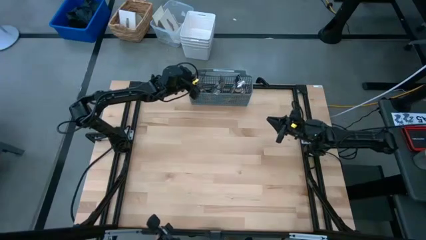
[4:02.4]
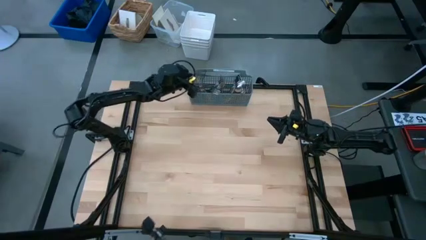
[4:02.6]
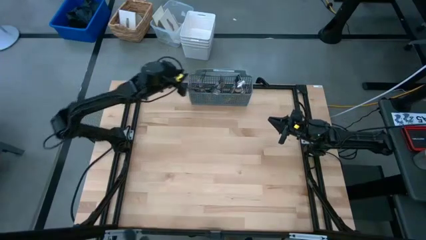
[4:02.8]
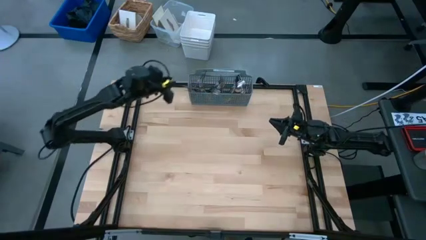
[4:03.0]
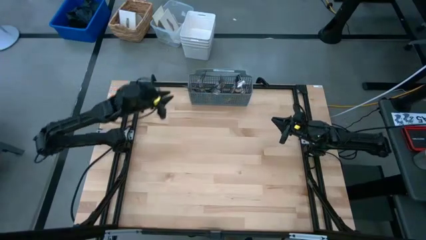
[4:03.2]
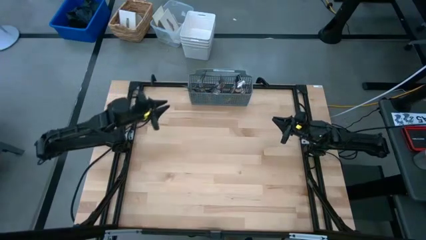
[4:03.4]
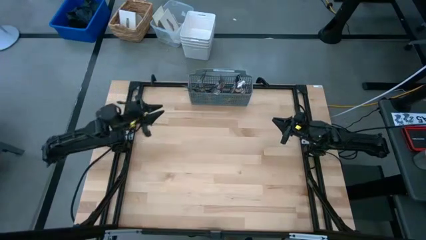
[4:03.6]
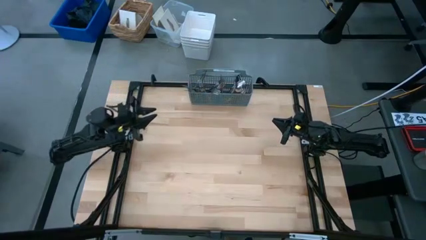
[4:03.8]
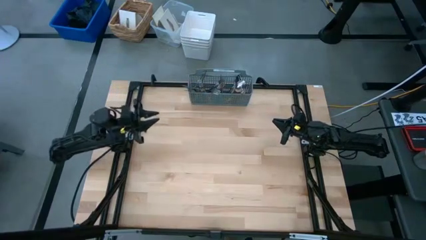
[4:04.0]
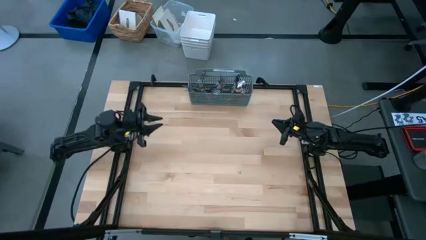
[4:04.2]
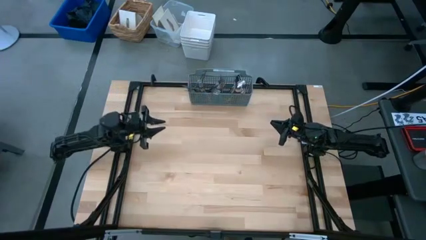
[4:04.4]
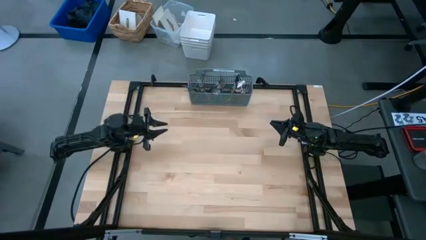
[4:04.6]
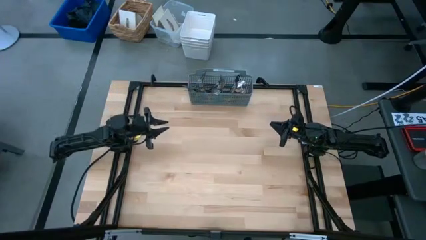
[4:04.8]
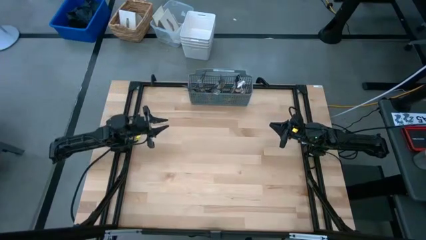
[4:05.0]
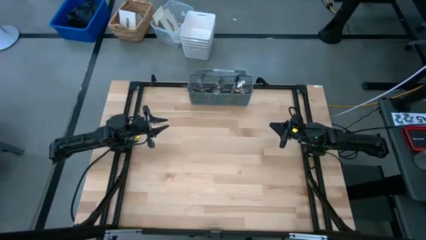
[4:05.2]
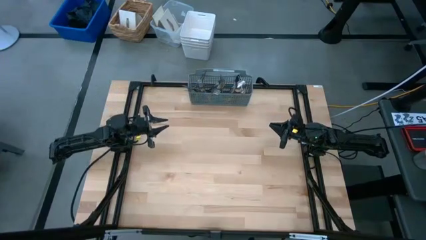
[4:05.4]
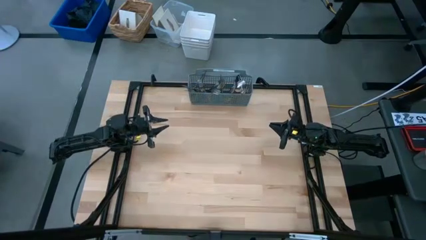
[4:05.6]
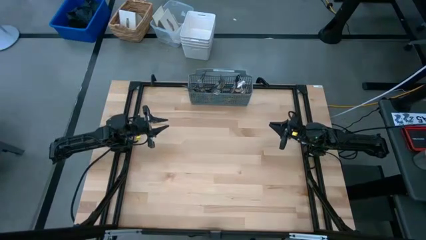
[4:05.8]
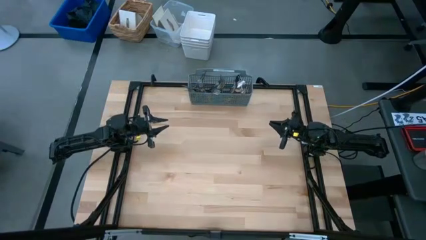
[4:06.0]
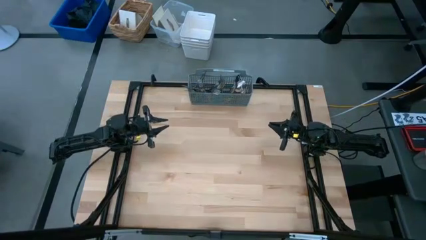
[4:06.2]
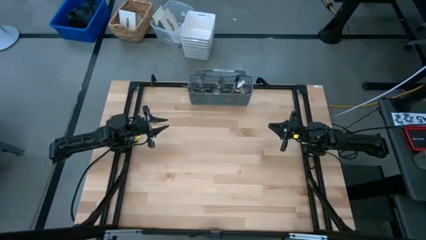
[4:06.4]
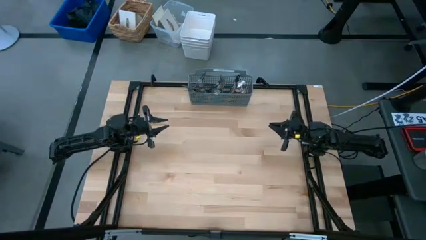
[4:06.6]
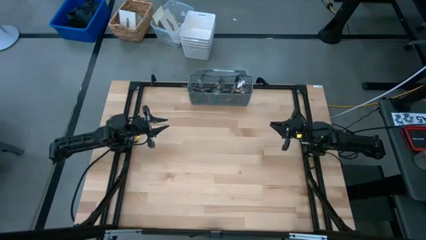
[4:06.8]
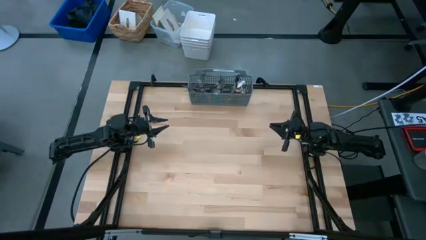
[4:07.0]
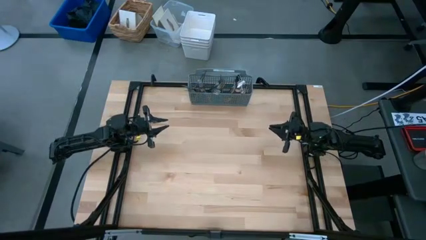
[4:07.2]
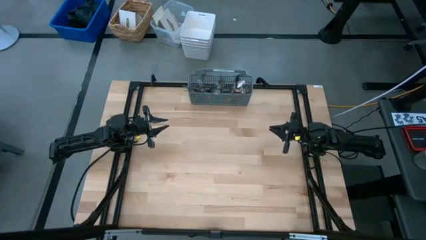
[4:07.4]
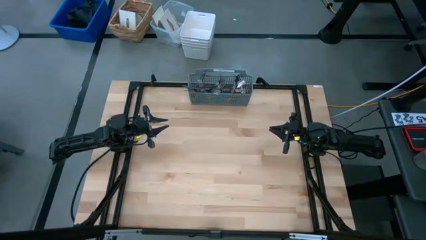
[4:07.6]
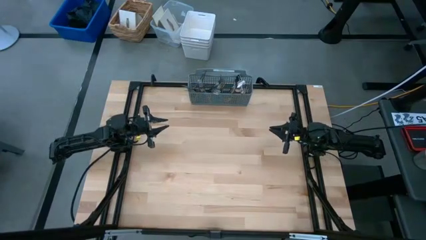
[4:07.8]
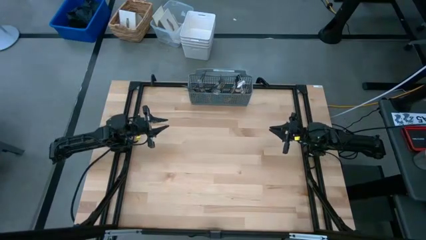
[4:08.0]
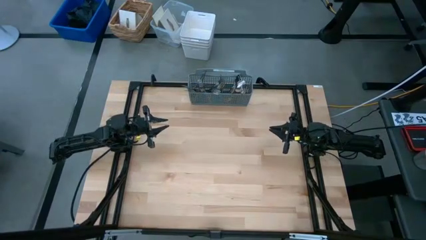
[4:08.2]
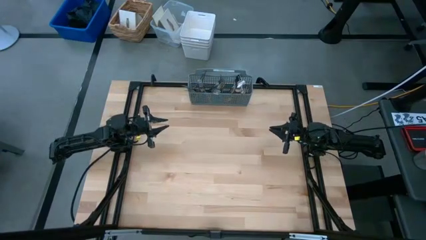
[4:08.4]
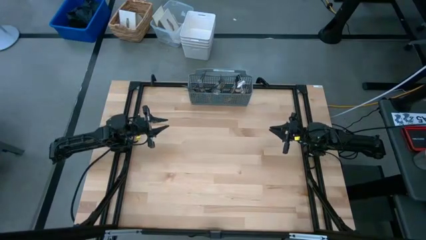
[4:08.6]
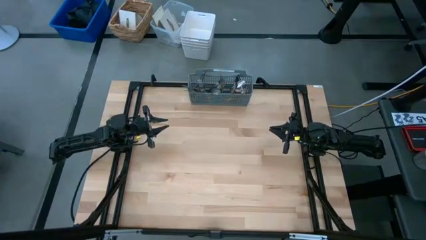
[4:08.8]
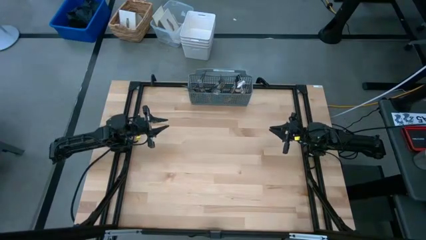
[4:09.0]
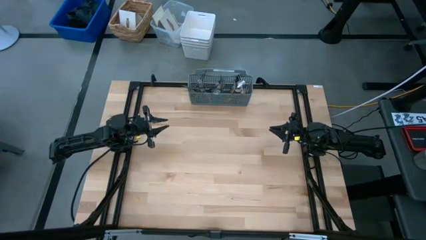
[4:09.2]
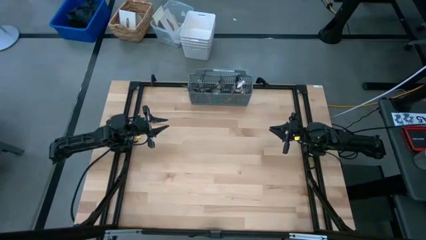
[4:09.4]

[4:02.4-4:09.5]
Task: Sort silverware
Return to Home Position

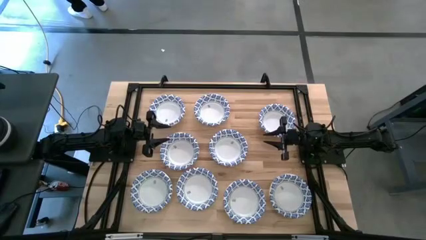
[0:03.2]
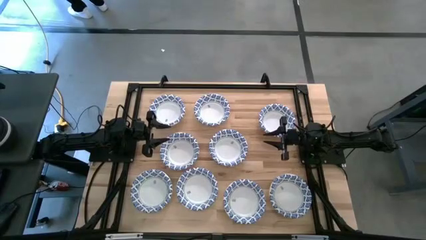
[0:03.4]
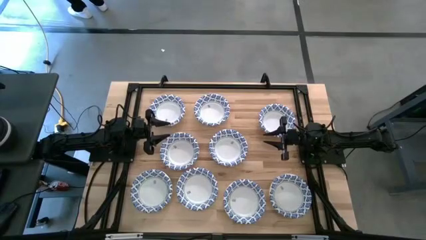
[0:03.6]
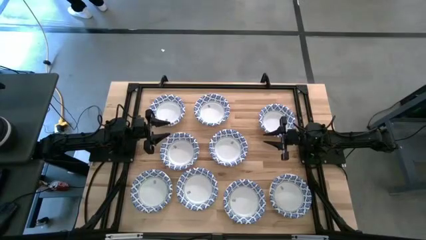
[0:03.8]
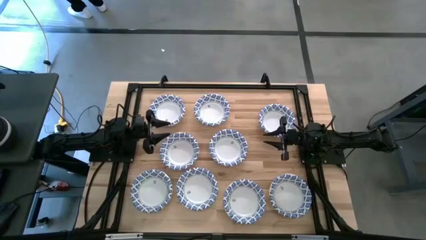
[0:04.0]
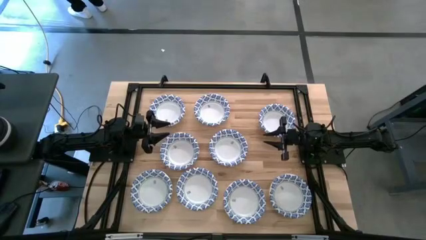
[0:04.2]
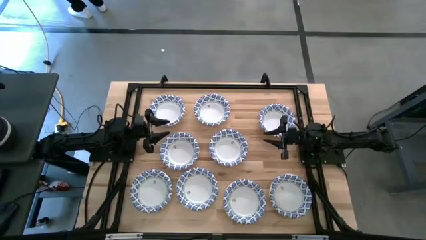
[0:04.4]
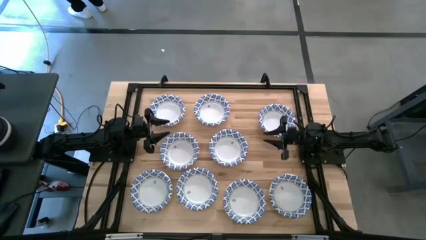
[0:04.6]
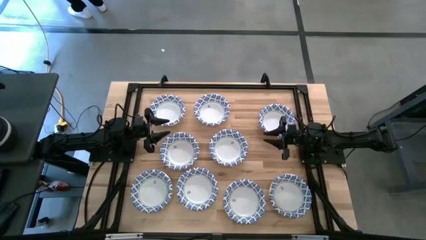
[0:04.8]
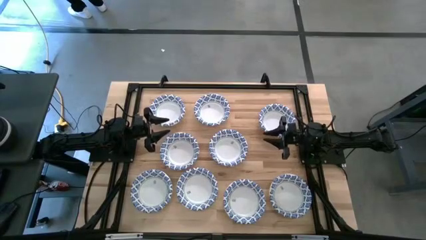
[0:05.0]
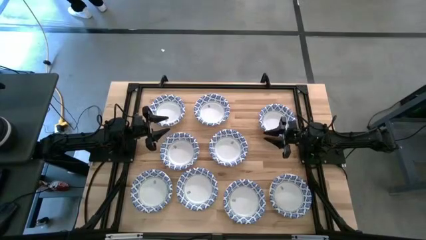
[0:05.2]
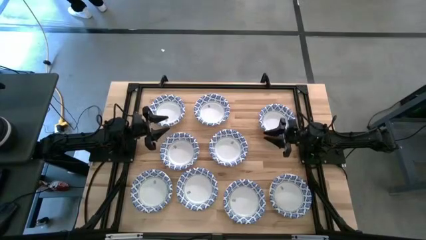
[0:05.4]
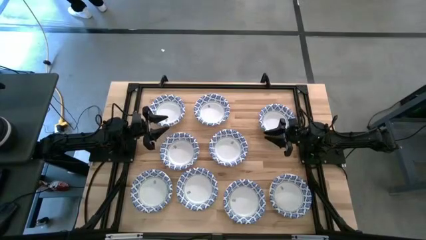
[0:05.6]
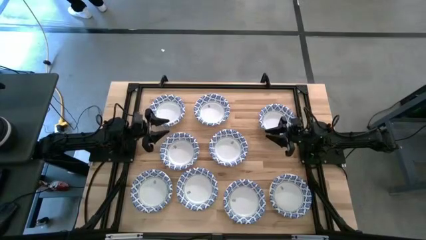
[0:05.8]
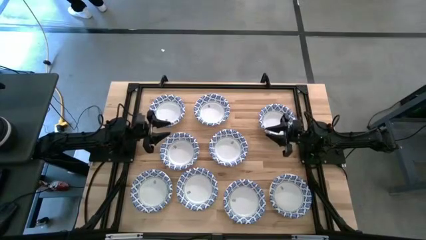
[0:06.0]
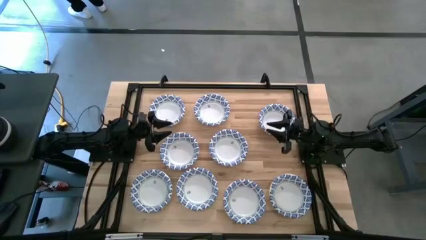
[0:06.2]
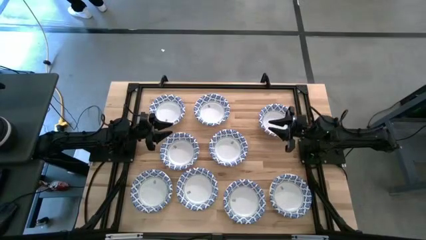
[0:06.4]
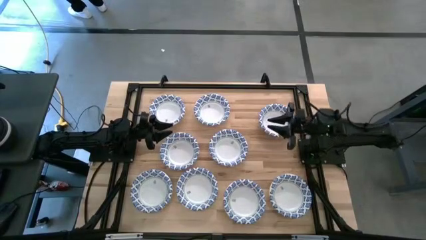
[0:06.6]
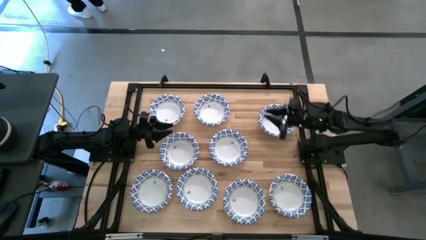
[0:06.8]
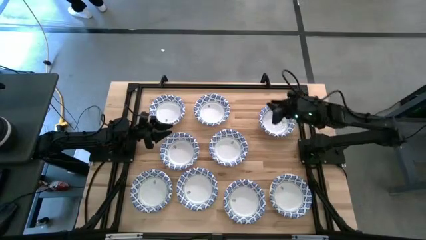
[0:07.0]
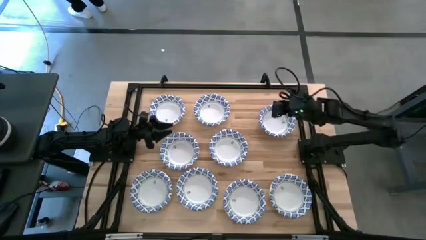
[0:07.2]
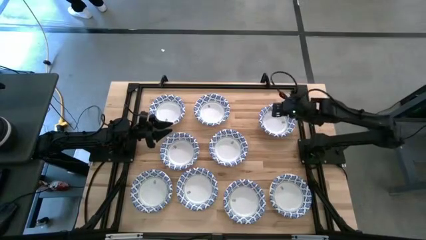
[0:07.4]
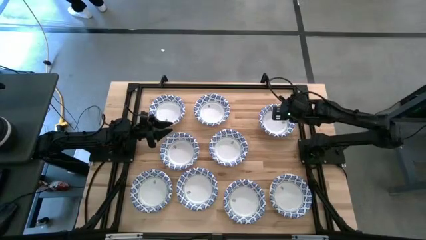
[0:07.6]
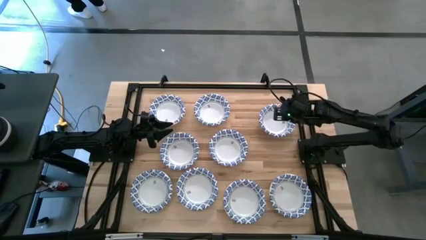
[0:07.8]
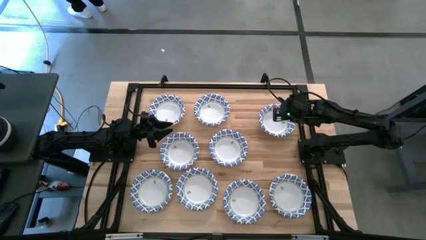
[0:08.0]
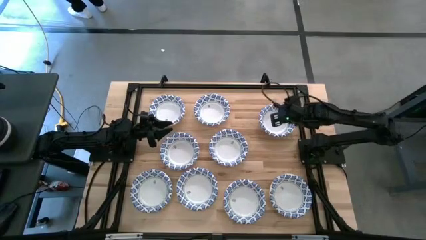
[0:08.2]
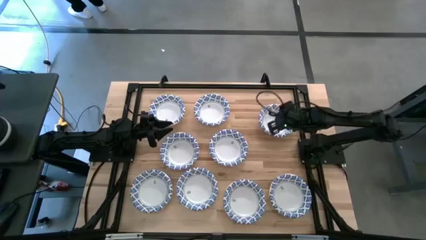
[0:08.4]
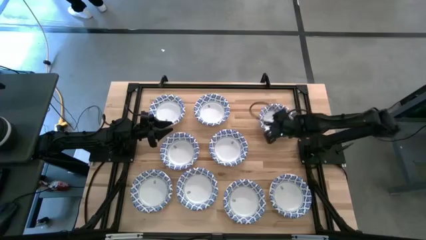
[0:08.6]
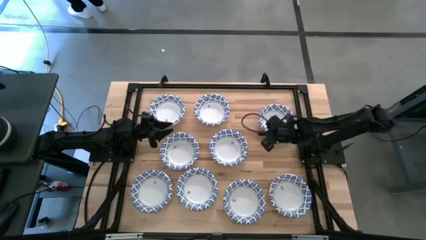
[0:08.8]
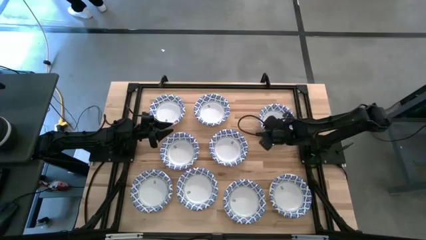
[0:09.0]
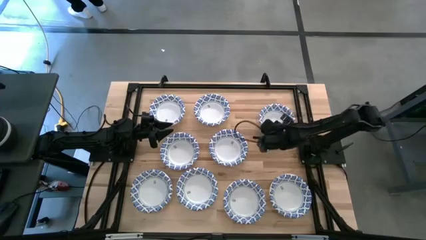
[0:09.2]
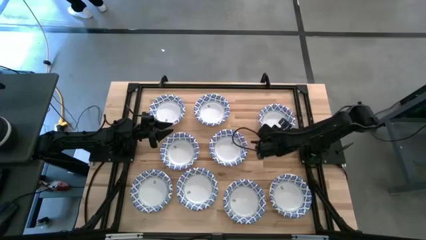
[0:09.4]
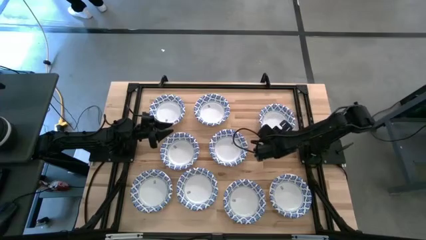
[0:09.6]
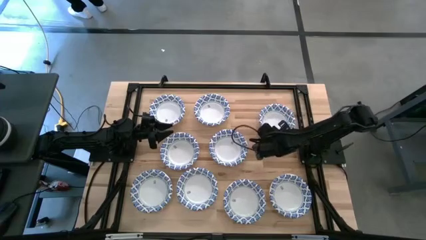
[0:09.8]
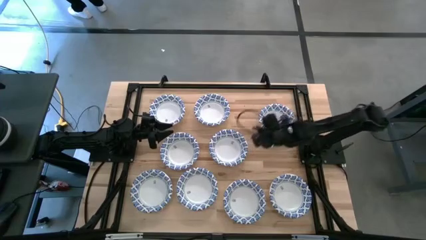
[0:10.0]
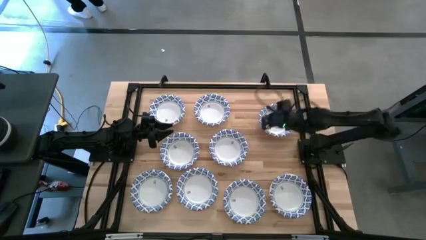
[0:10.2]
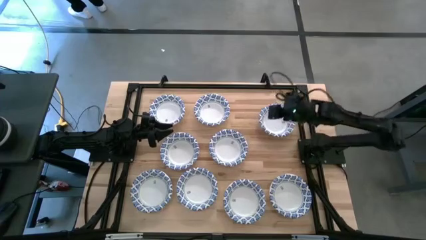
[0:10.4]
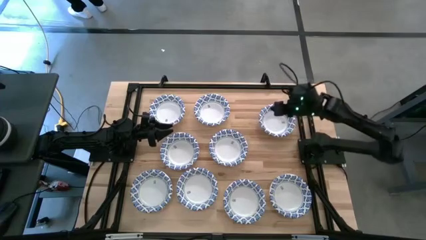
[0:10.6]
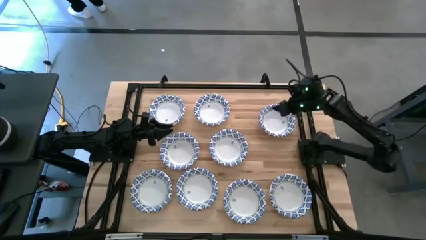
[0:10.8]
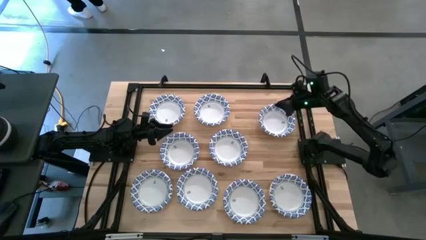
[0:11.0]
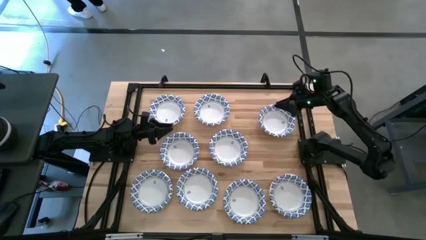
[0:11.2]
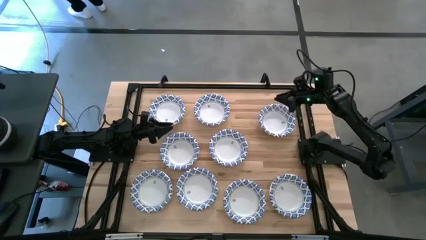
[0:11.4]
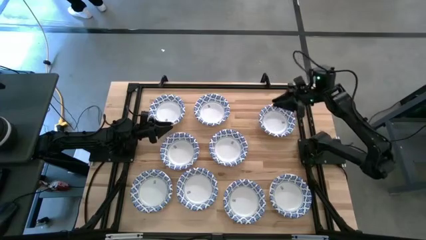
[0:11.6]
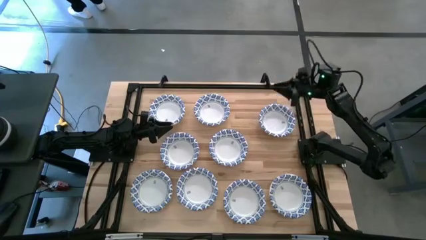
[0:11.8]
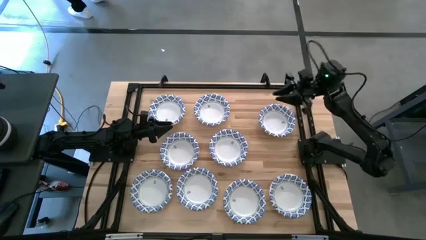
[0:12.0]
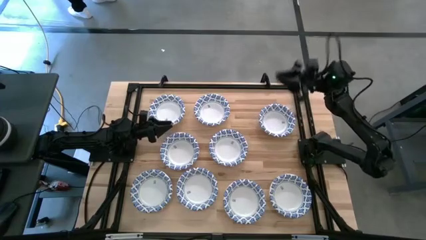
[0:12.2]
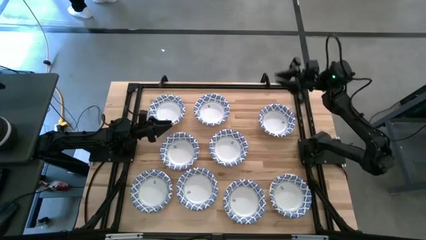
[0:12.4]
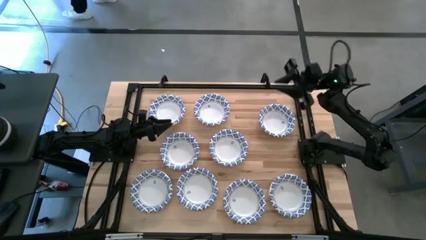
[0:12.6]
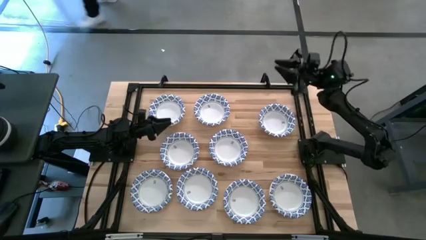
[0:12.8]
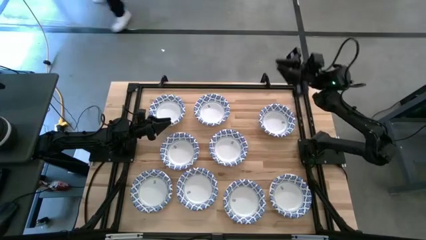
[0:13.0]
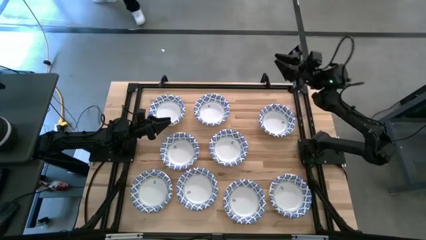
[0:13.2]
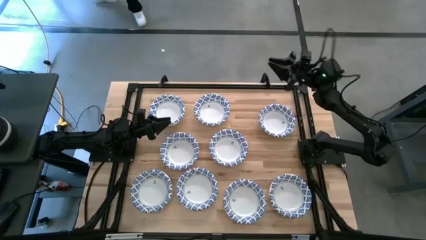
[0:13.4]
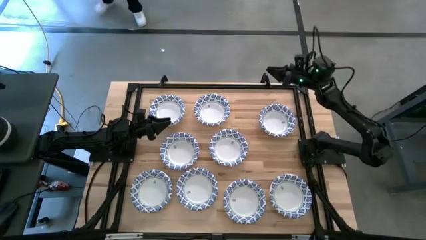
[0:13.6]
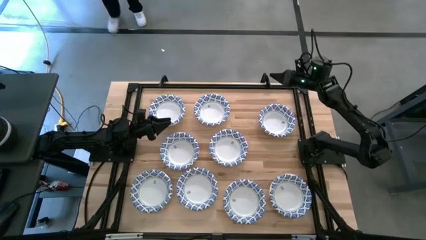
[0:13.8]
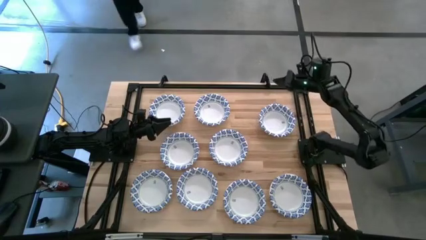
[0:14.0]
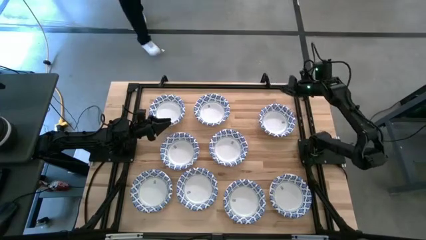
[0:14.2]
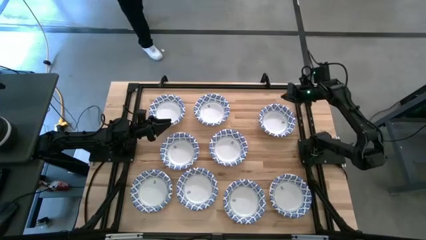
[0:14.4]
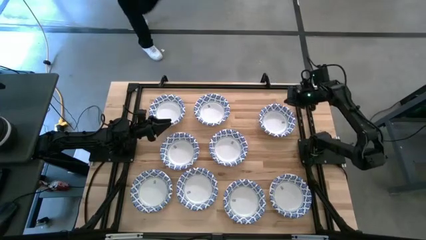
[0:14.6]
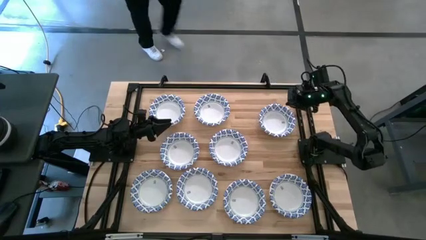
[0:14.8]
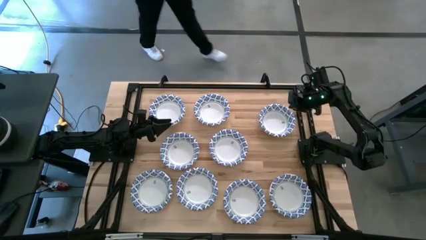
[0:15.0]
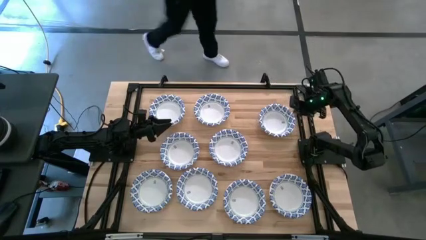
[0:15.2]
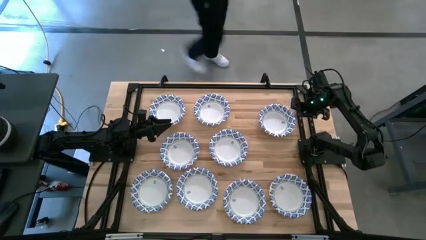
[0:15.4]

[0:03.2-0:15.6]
Task: Nest bowls inside each other
Stack the white patterned bowl on top of the other white patterned bowl
